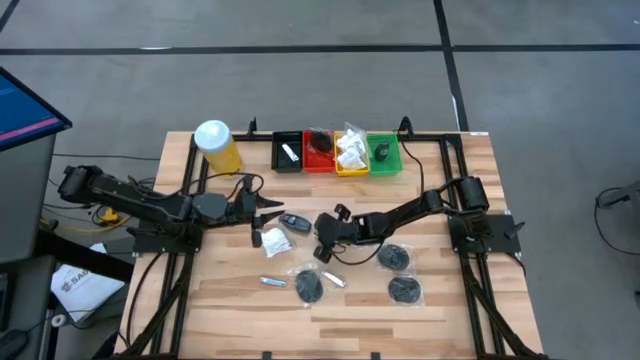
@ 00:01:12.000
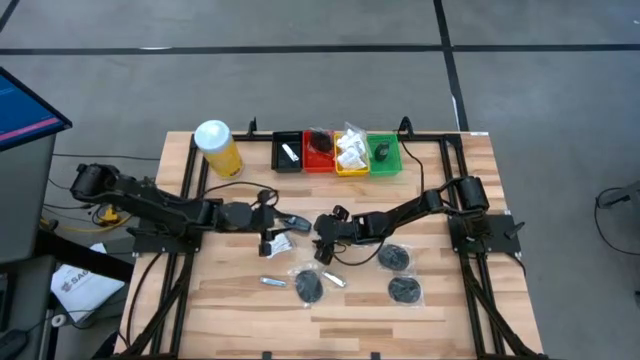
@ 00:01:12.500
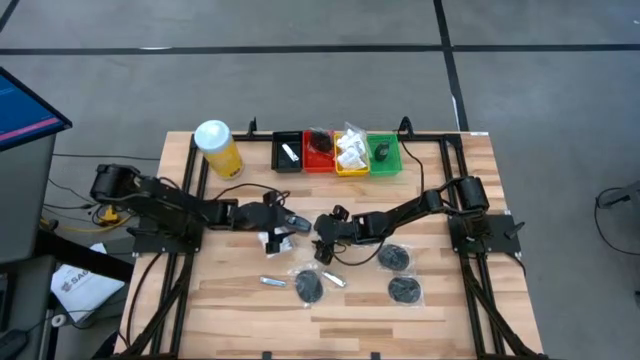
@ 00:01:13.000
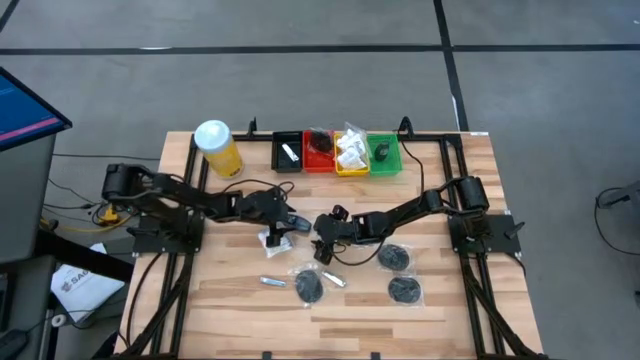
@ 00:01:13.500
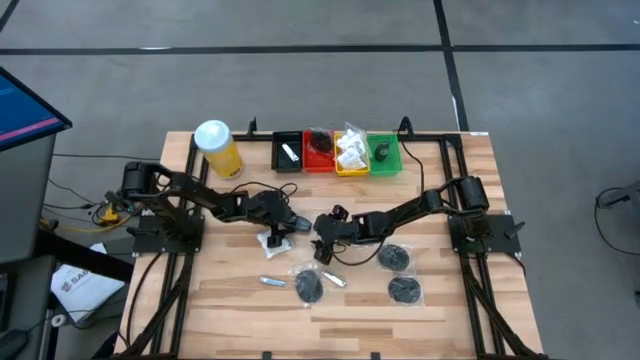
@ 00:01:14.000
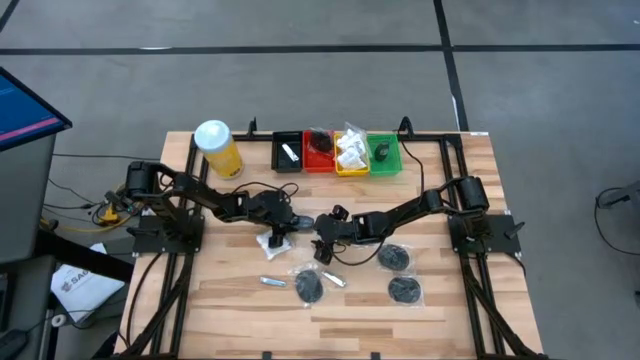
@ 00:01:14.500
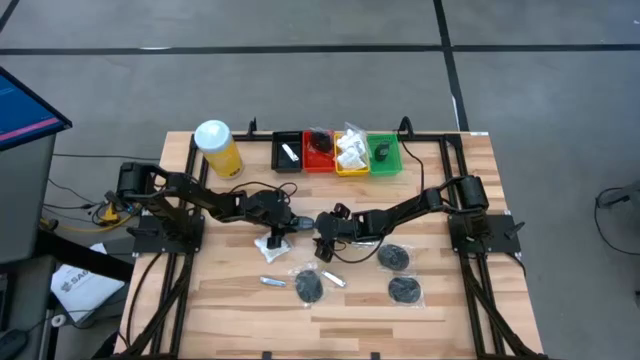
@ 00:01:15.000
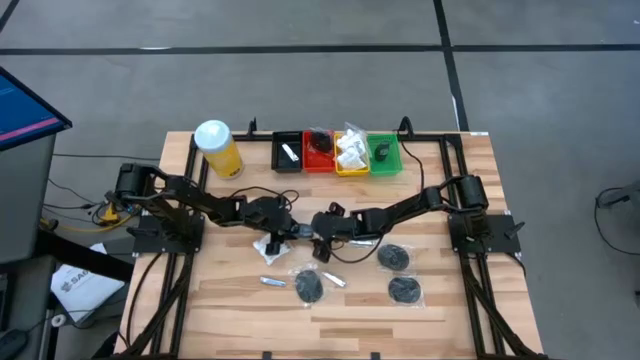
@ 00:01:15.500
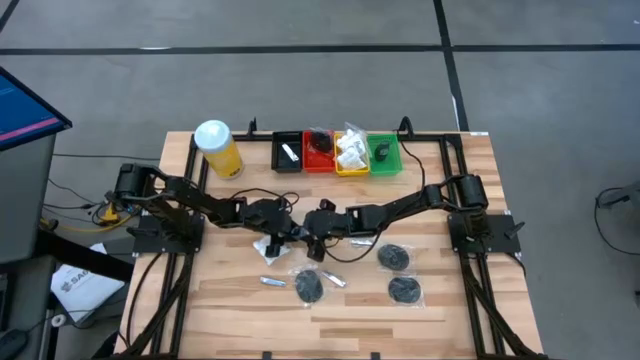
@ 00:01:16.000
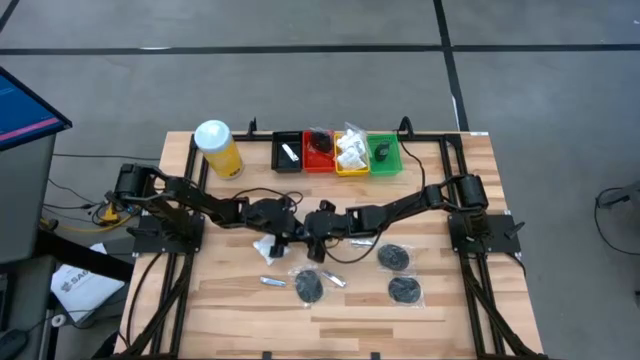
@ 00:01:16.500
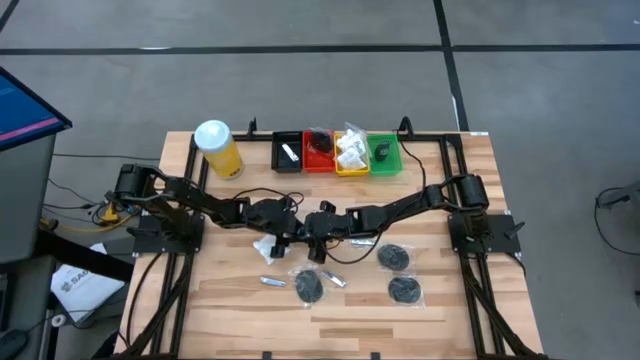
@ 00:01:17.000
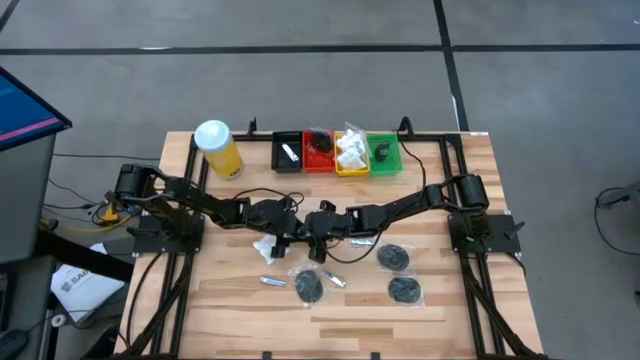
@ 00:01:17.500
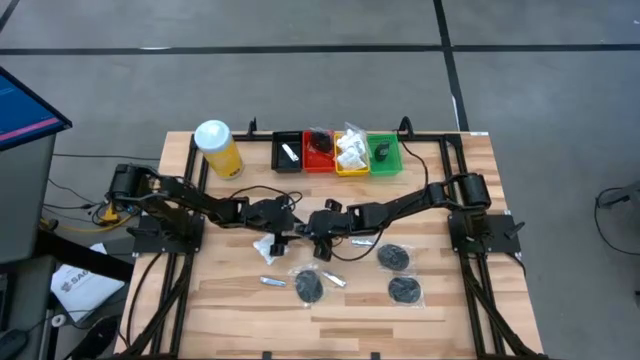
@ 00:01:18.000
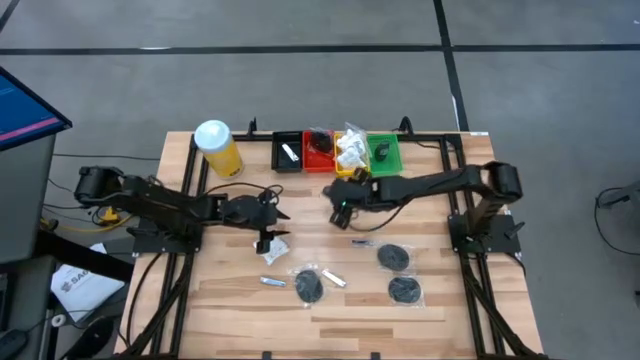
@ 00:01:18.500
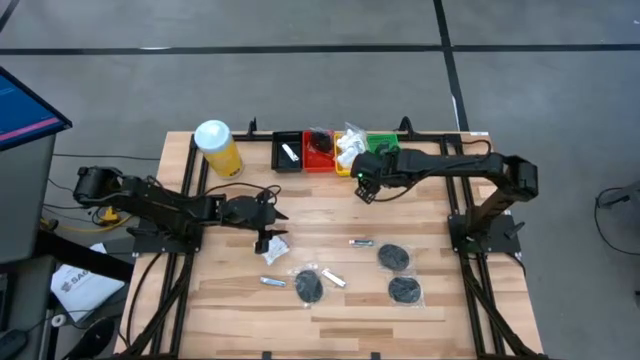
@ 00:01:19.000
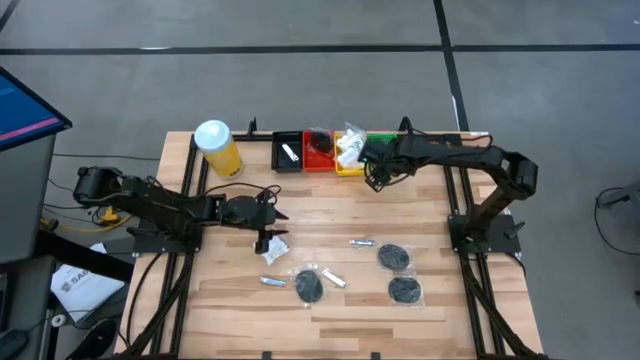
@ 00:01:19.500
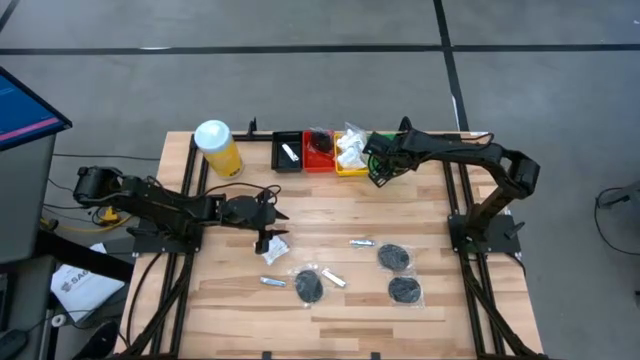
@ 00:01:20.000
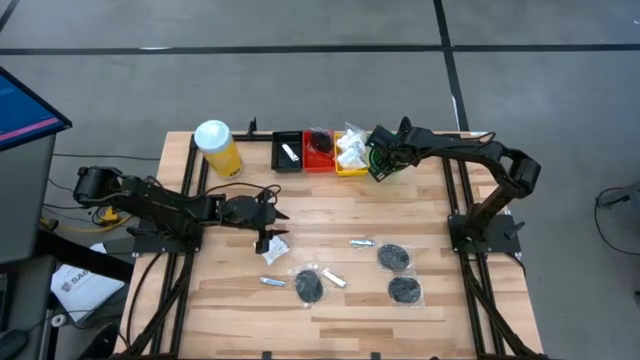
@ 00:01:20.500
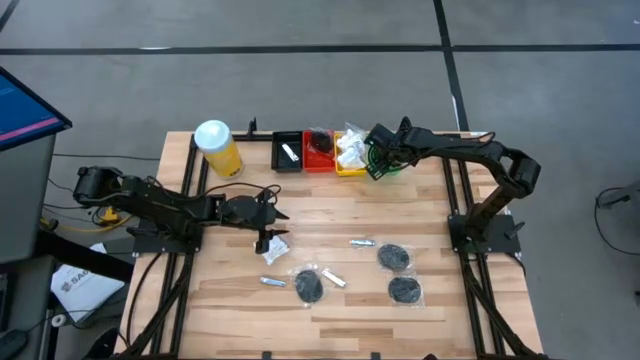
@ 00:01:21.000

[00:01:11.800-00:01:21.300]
Task: Pick & Place Travel size toiletries
Put the deodorant into the green bin

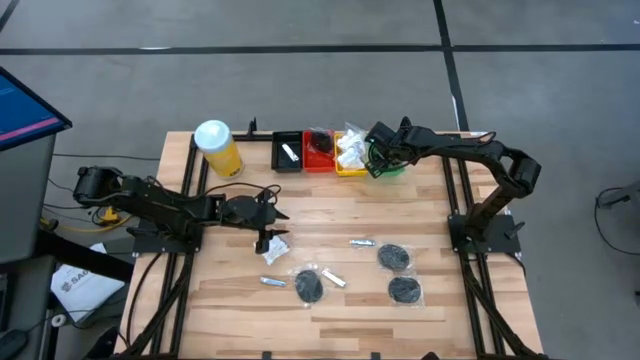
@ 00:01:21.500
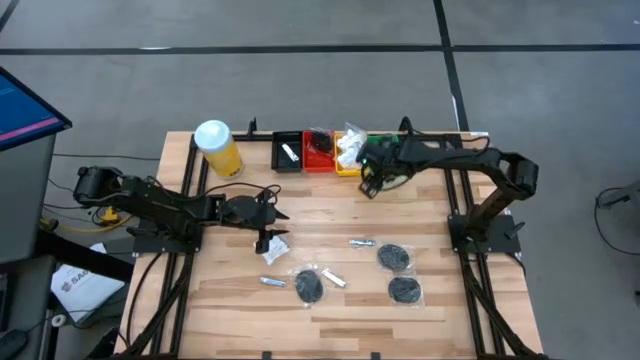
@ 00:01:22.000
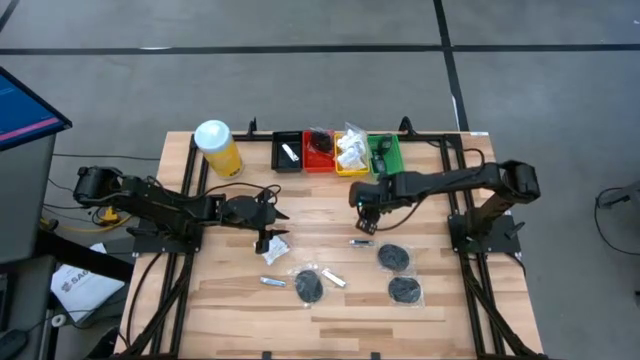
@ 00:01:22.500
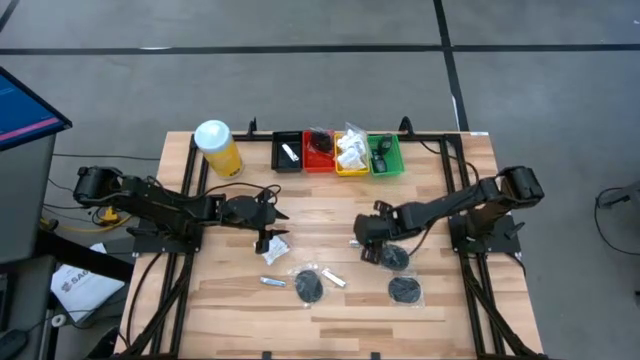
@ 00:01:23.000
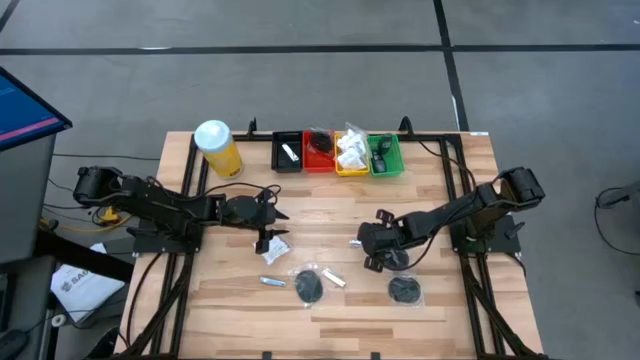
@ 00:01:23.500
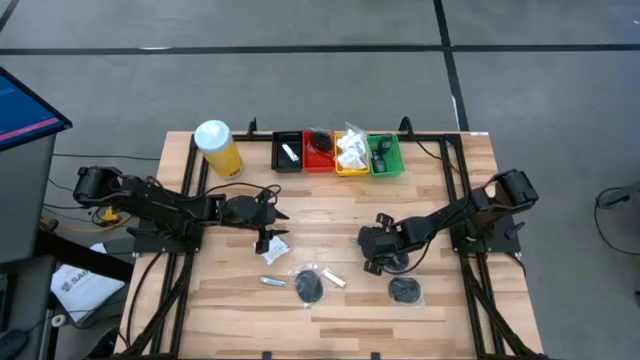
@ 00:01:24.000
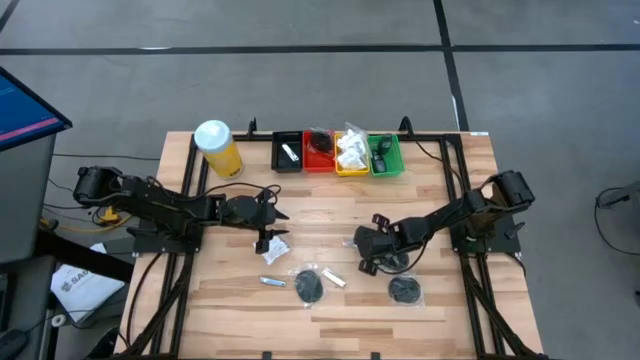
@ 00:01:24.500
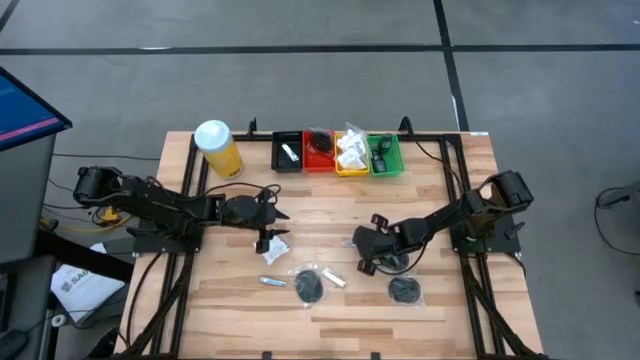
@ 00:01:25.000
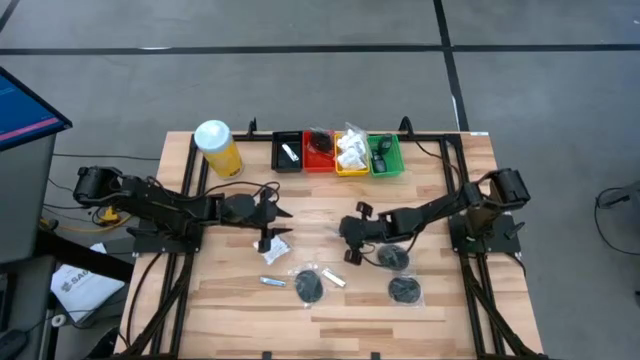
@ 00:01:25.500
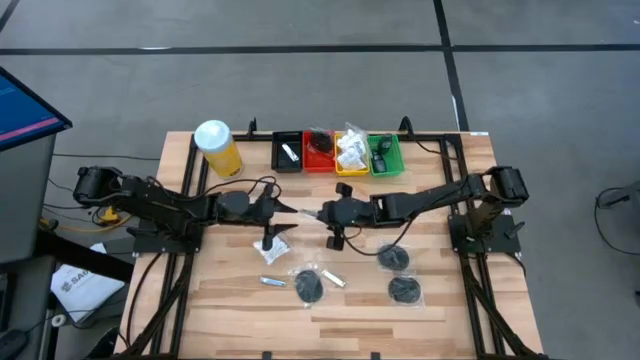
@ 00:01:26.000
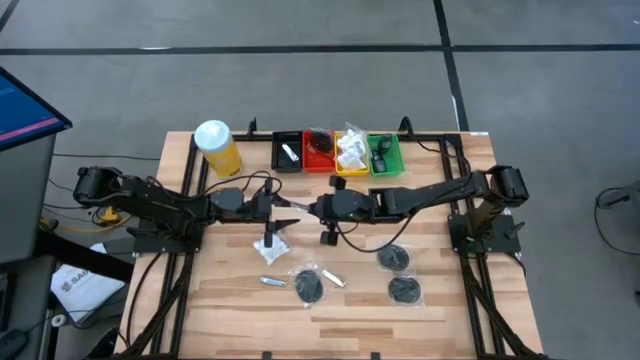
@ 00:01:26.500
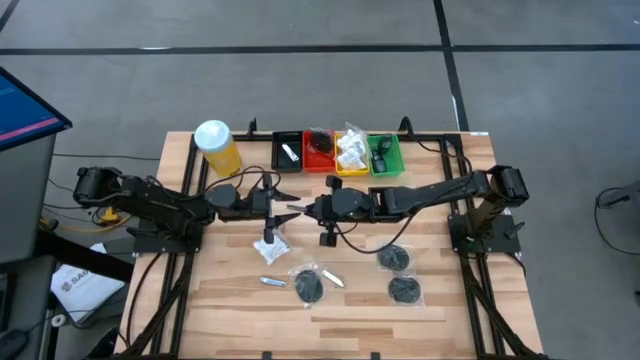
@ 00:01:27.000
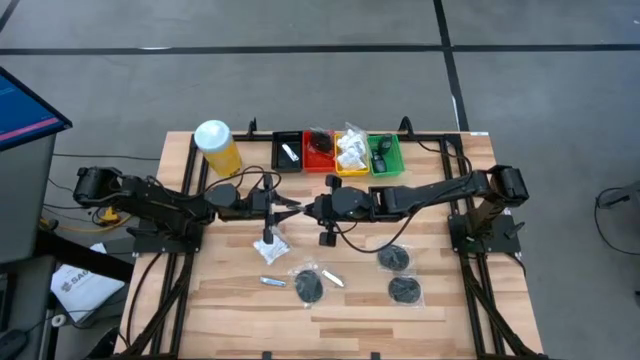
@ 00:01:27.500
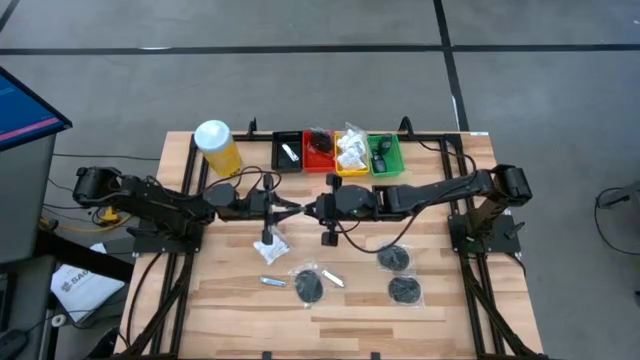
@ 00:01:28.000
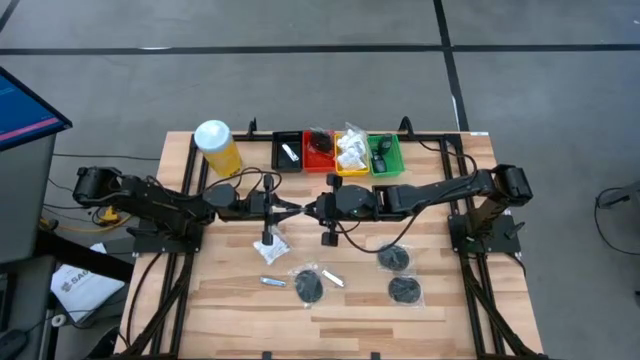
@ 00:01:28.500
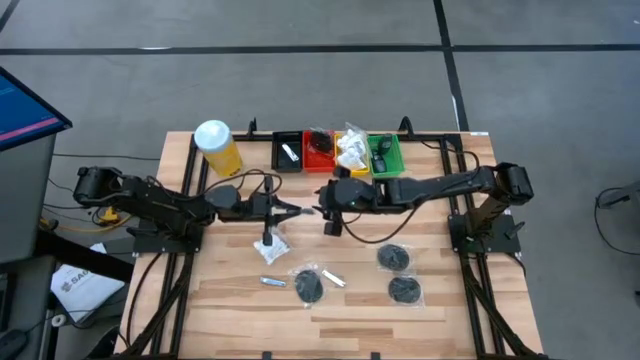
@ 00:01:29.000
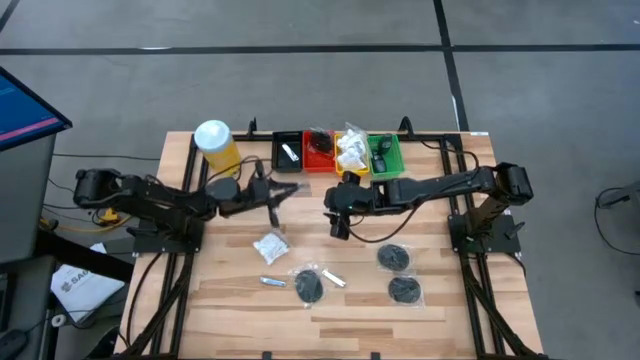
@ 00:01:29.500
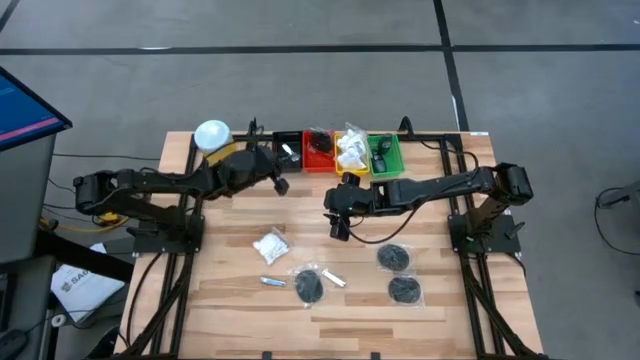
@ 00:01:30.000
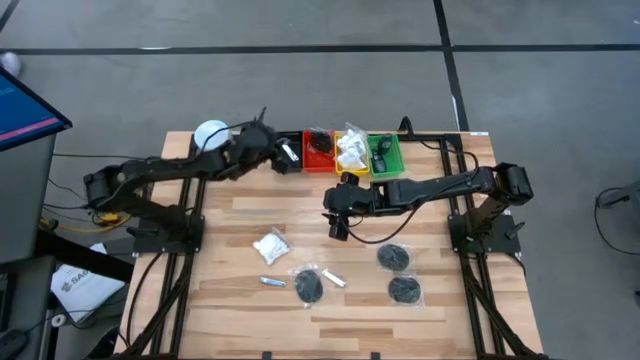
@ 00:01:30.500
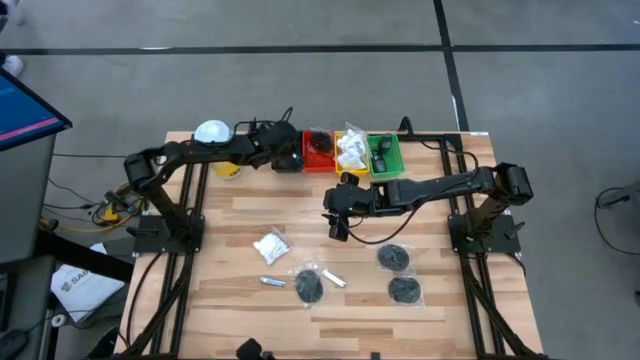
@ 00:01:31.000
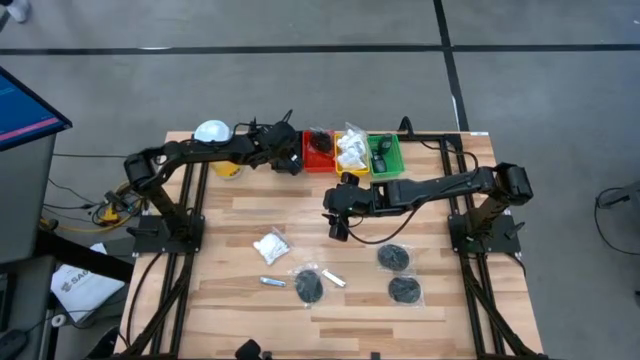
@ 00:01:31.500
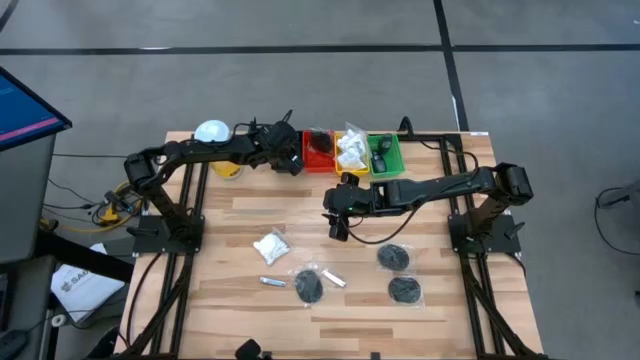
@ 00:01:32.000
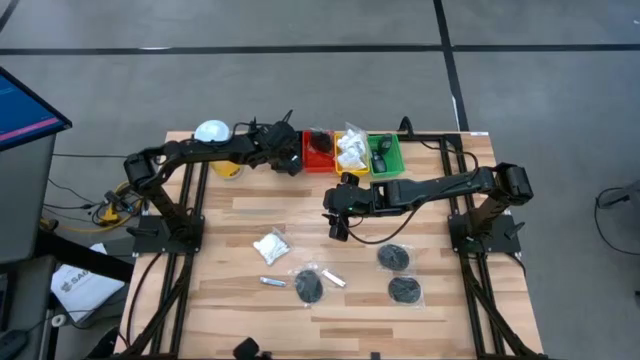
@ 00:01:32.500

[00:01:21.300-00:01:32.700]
Put the nail cutter into the black bin
